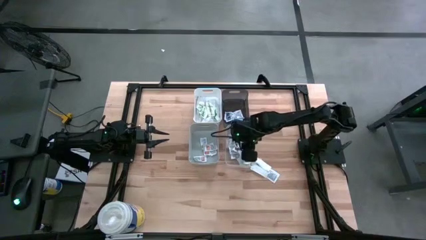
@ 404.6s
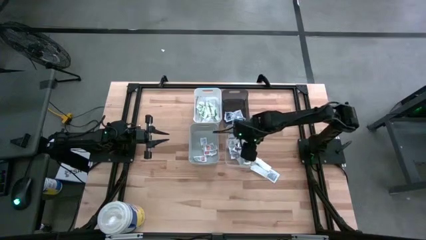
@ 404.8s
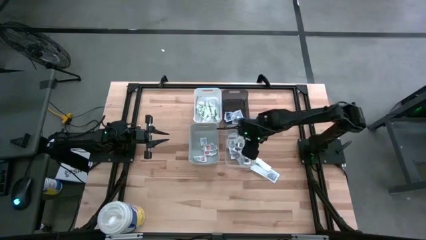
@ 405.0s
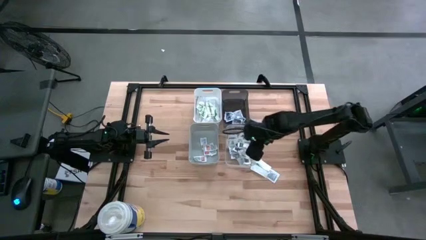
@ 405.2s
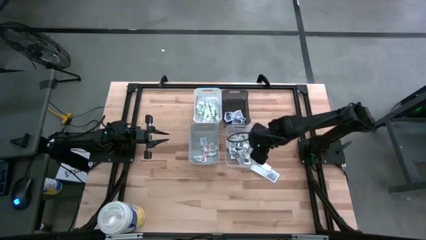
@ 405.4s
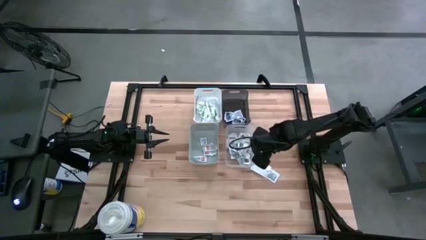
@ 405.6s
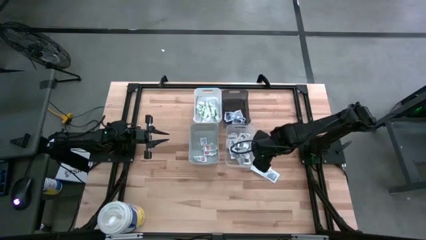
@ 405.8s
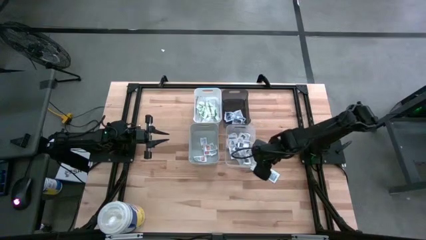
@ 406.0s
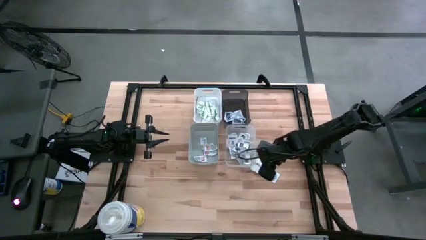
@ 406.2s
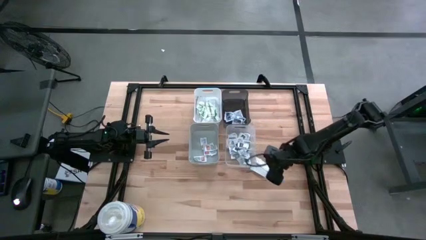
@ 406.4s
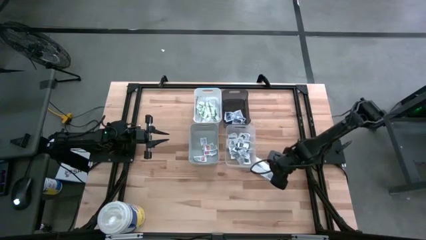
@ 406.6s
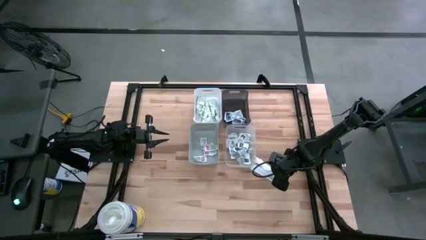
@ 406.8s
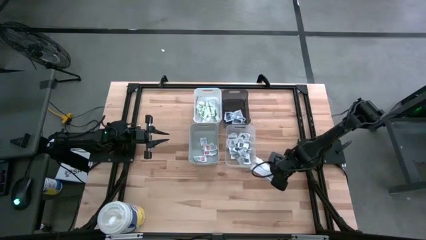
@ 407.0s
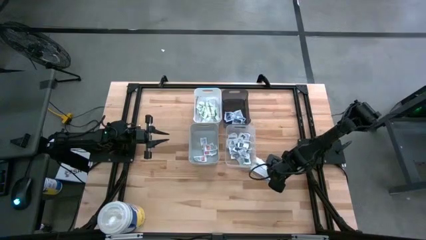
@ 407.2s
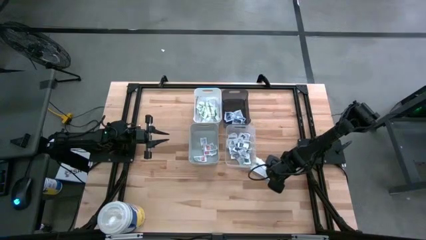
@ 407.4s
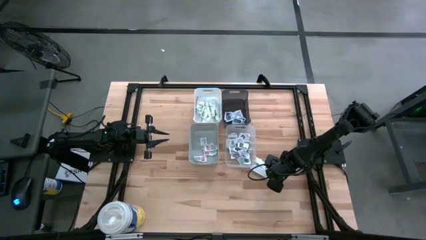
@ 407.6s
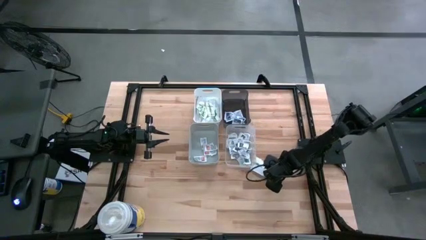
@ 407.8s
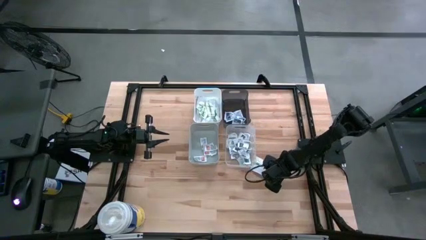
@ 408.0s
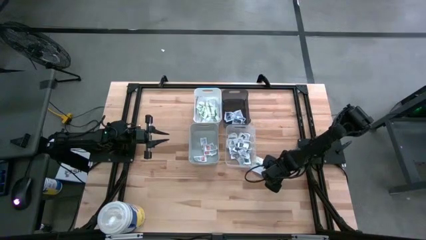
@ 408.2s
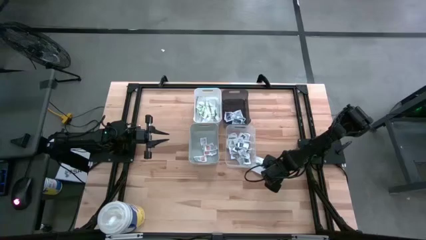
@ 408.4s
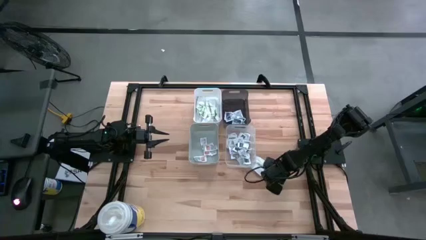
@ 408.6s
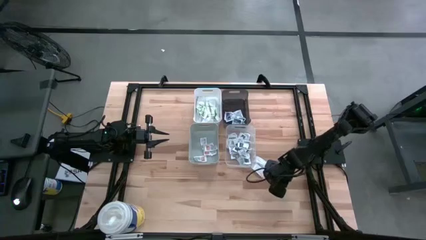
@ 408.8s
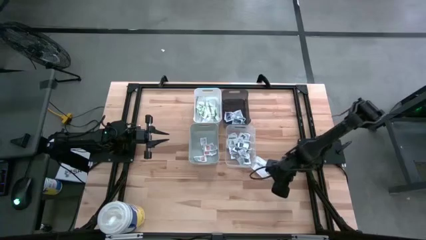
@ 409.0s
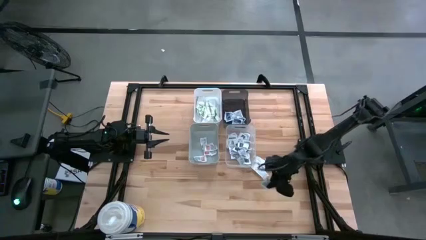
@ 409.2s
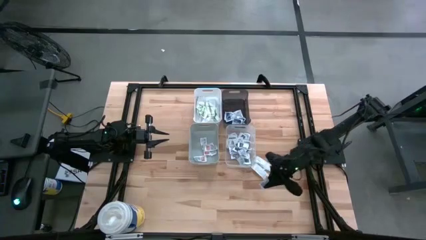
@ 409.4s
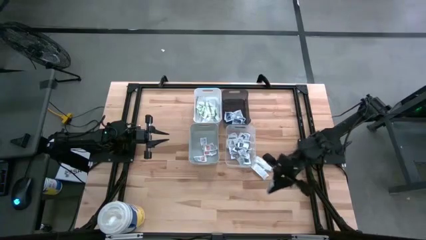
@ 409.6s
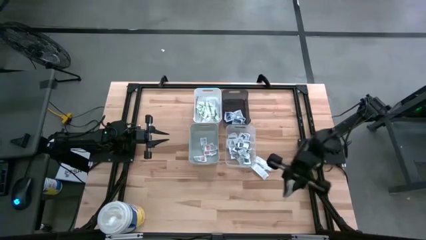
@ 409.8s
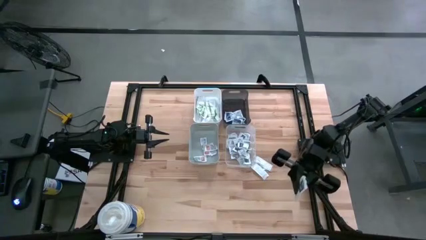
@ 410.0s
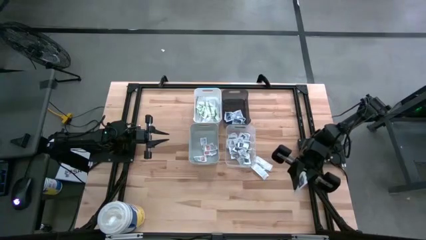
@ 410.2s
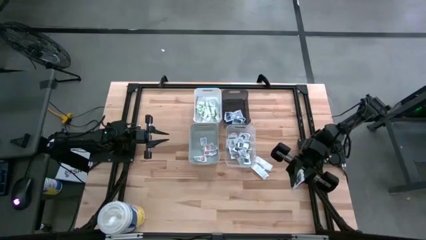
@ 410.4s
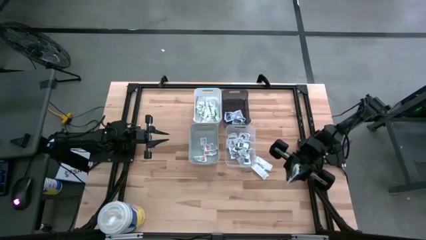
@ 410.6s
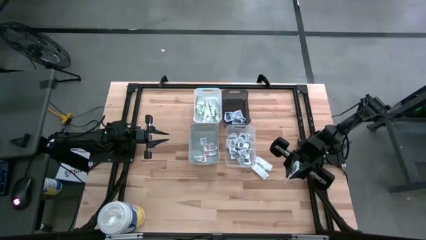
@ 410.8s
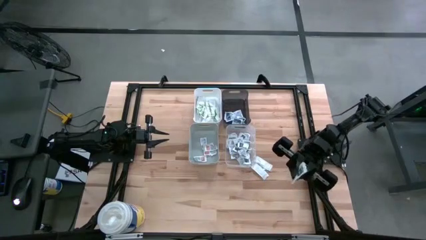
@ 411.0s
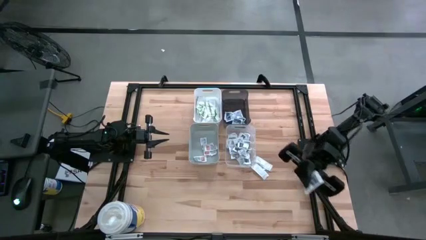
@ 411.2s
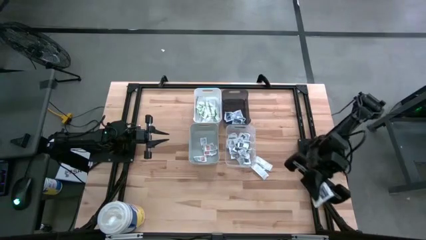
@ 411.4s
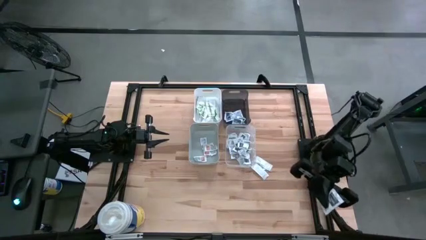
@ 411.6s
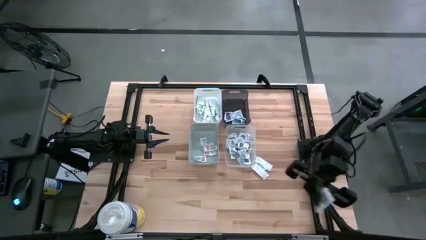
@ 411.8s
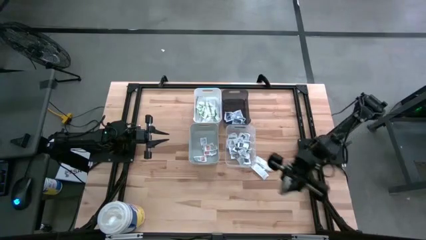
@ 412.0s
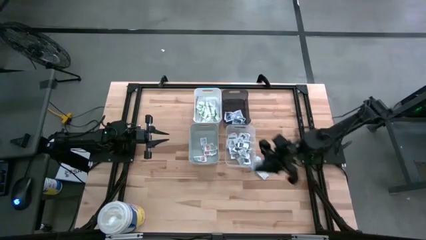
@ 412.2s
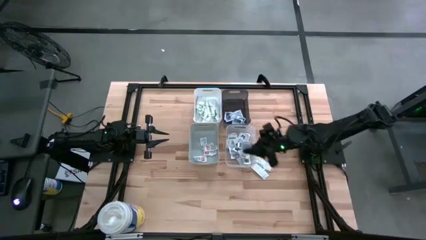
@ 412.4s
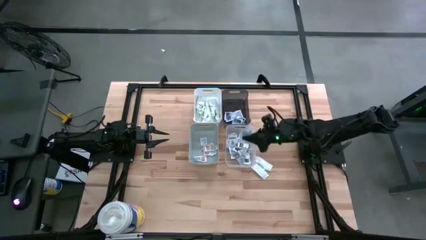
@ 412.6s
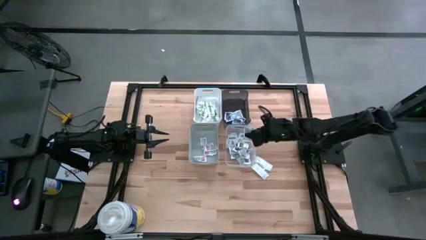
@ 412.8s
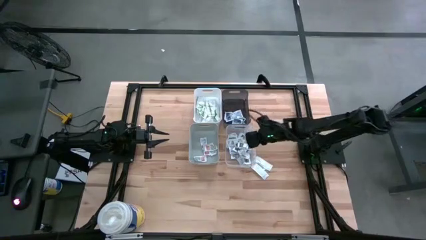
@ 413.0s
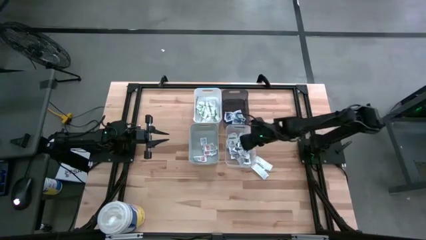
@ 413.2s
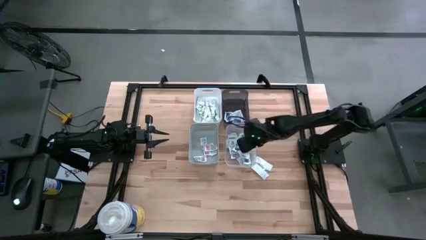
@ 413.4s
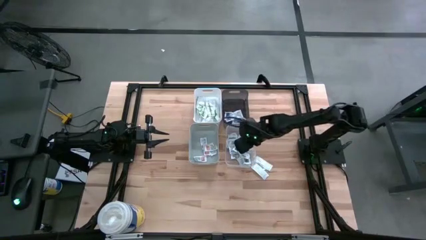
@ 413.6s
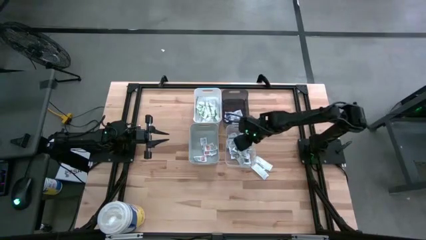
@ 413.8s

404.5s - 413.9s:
Task: Pick & Place First Aid Supplies
Put the gray towelette pack into the transparent bin

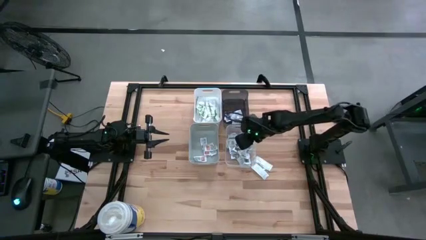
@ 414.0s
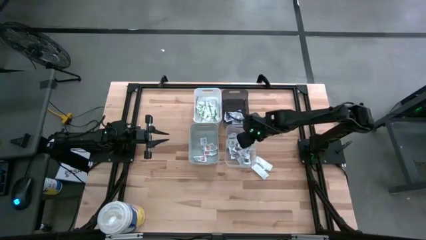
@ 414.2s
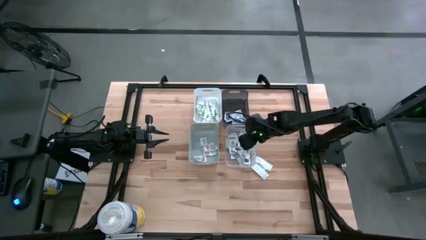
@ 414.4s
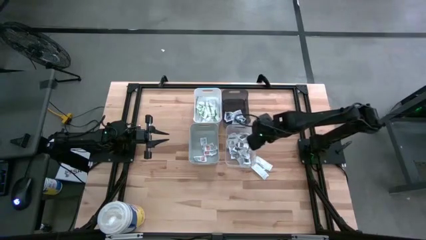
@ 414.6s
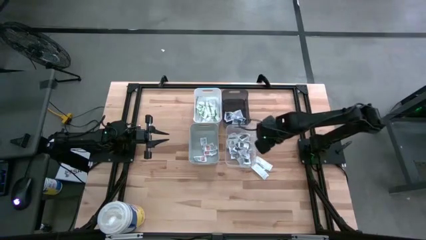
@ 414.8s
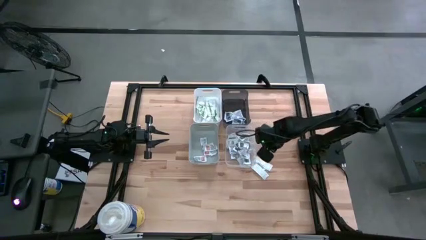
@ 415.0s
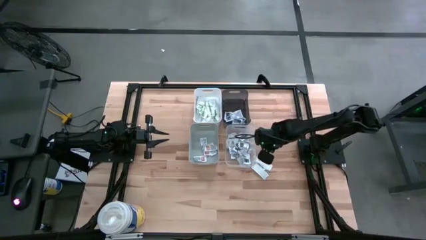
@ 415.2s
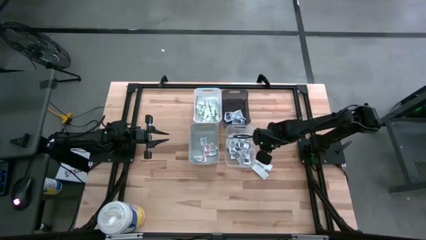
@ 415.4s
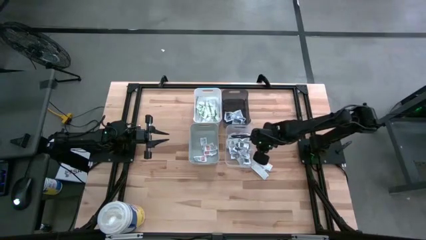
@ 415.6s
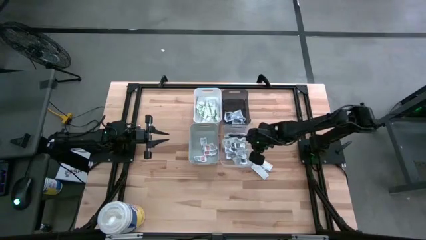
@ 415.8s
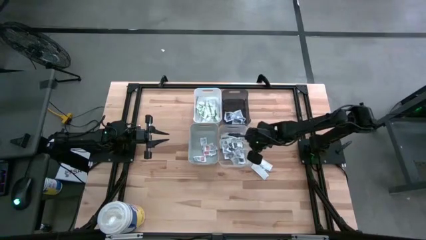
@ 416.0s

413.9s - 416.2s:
Adjust the transparent bin

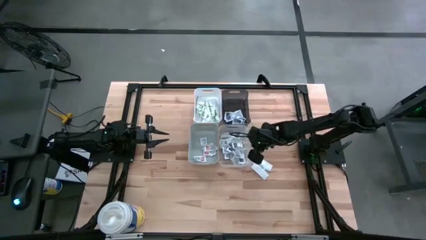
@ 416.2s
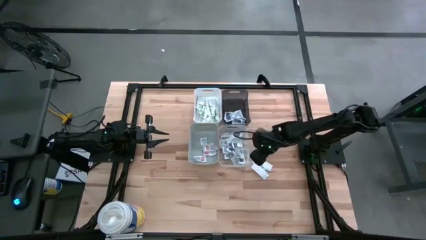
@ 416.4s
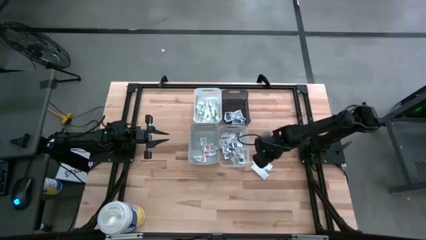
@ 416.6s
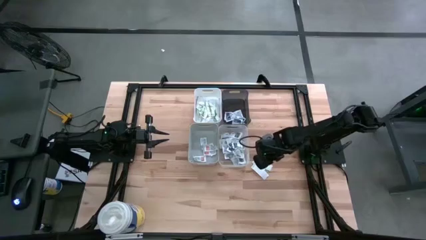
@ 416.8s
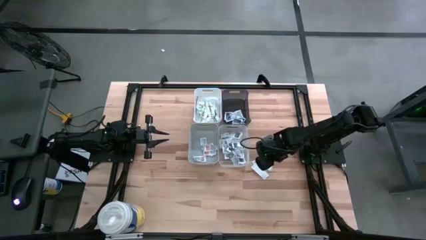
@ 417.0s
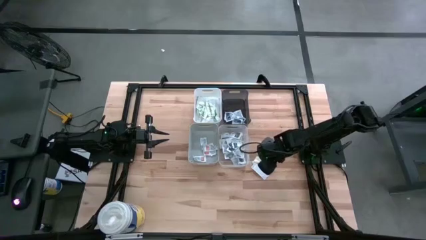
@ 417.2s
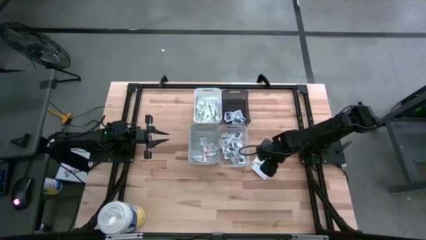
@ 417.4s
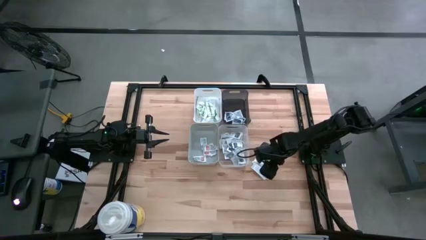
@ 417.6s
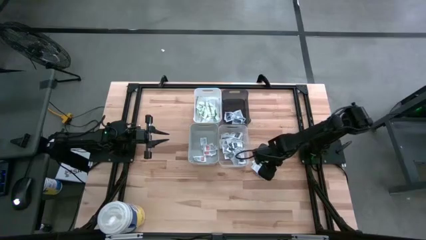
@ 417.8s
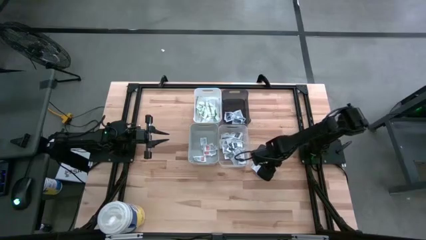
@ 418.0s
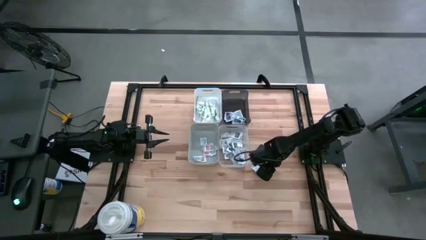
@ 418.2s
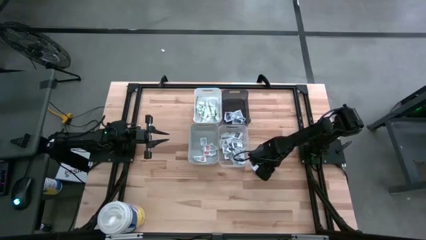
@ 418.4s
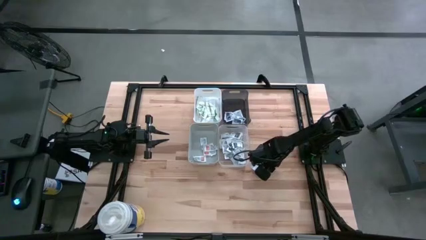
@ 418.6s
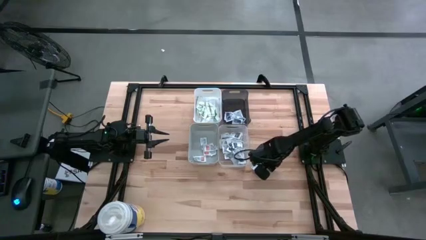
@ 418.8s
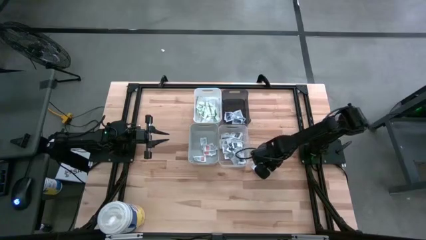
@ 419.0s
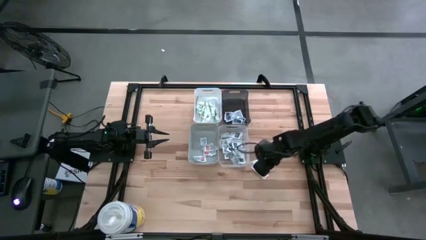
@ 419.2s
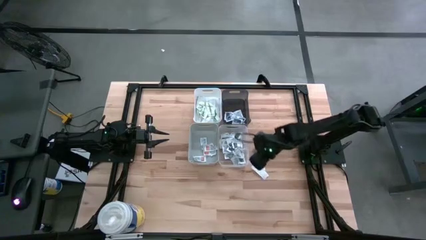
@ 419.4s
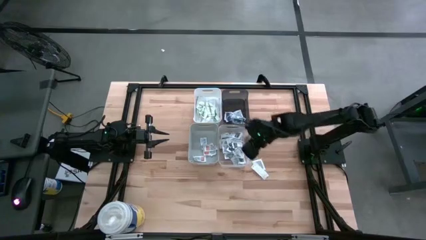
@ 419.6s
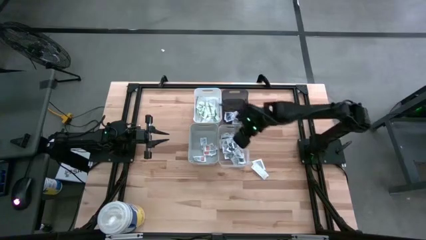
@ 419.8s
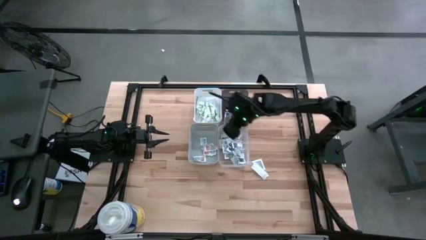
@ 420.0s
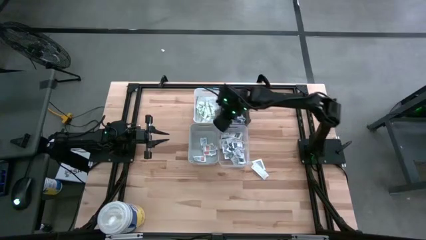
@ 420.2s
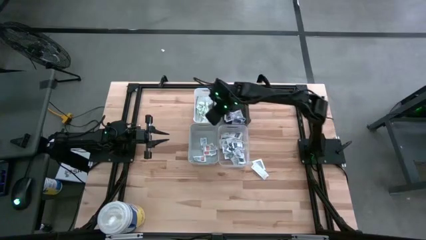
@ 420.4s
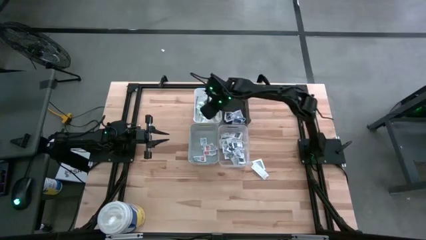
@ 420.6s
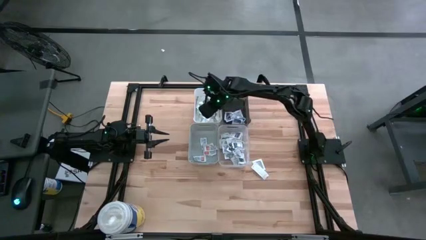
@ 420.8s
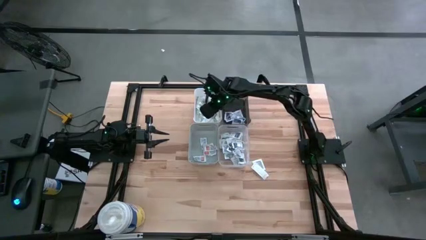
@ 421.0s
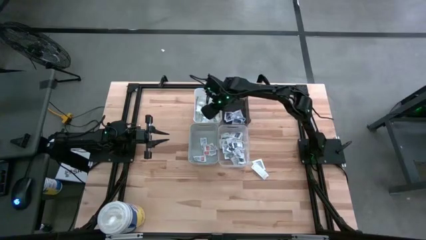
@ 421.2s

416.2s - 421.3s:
Put the green bandage pack into the white bin
